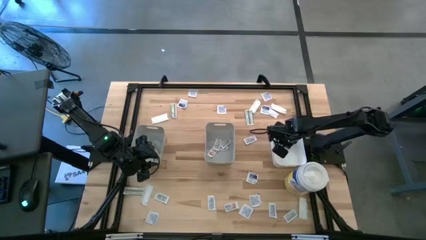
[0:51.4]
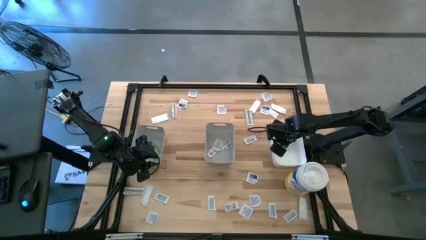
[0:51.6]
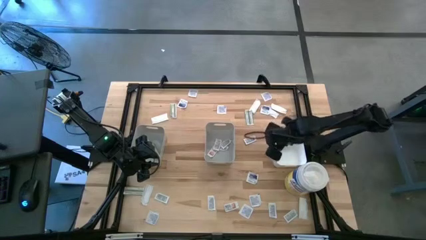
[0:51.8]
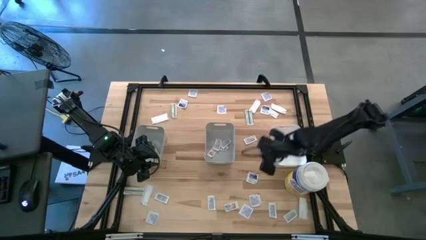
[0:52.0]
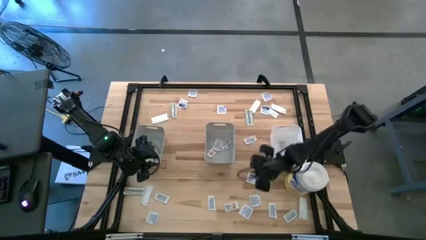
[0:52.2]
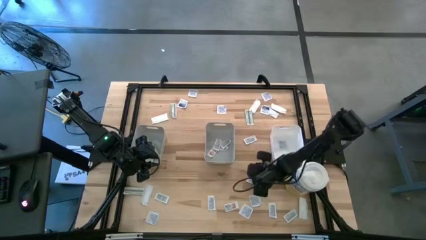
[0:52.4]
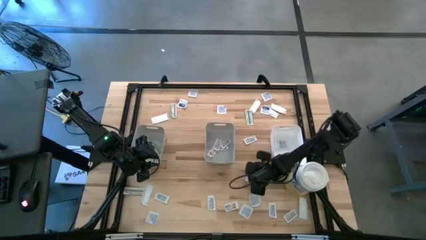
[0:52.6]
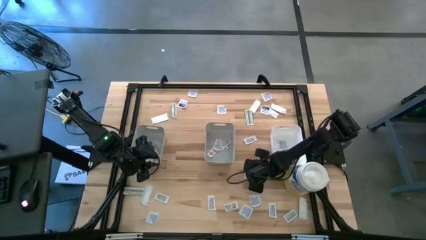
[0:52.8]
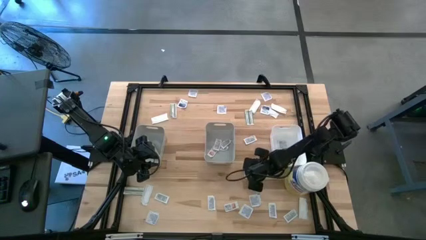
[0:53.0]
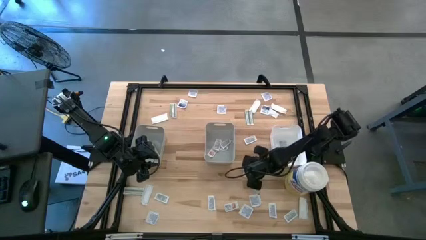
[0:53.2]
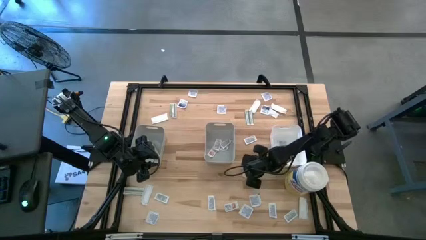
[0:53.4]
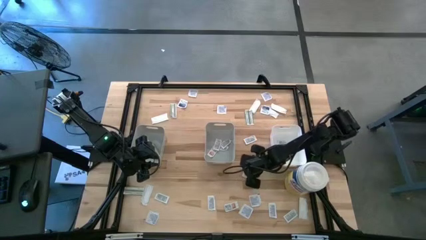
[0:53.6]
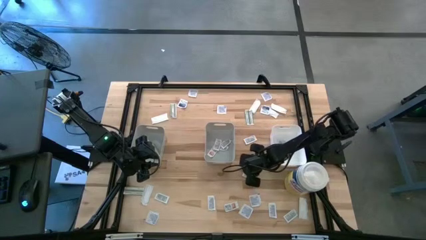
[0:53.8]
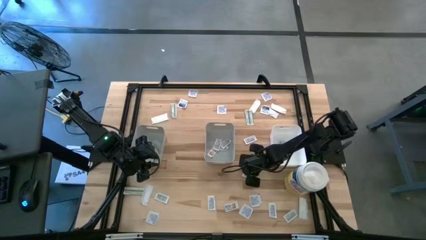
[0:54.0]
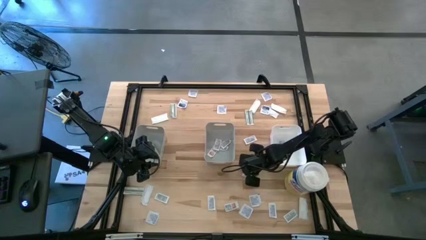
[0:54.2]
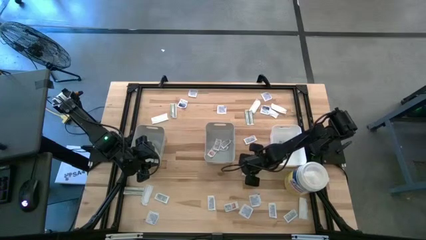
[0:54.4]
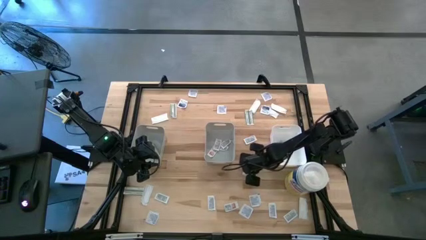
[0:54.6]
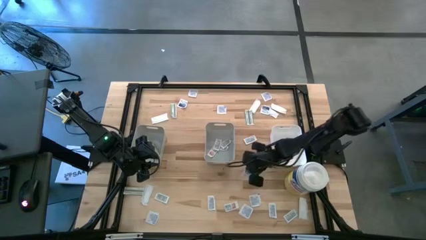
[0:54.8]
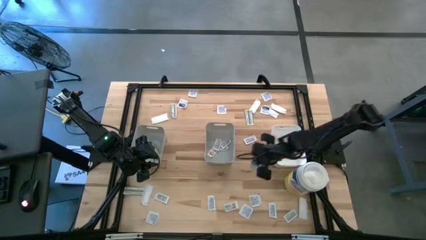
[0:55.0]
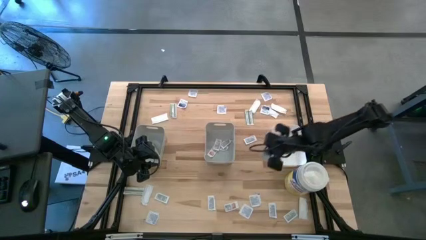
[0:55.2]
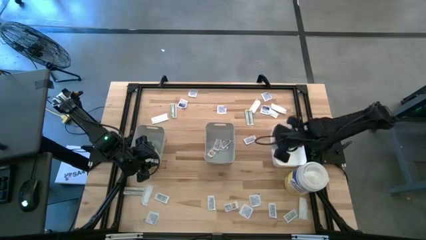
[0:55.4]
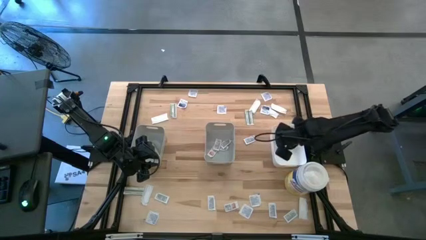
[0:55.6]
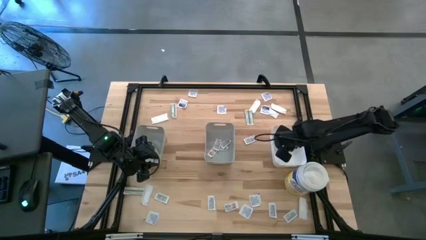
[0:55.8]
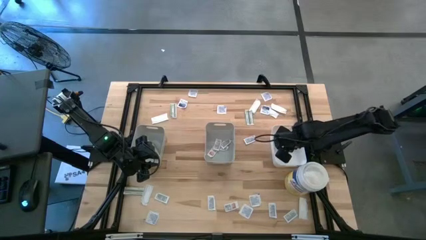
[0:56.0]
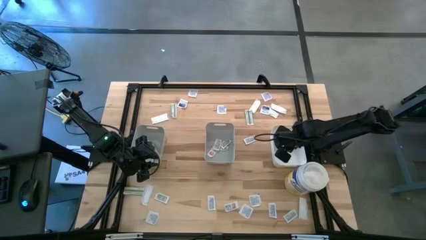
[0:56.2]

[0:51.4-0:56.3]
Task: Pick & Place First Aid Supplies
Put the alcohol pad into the white bin

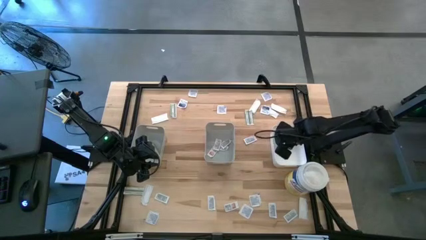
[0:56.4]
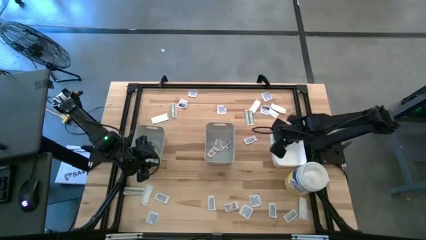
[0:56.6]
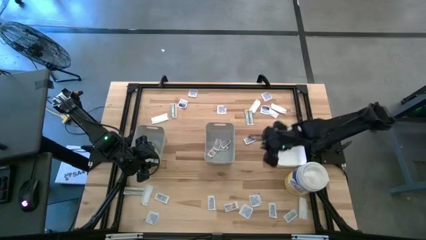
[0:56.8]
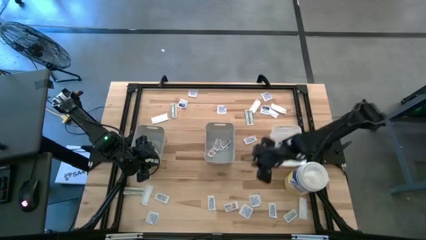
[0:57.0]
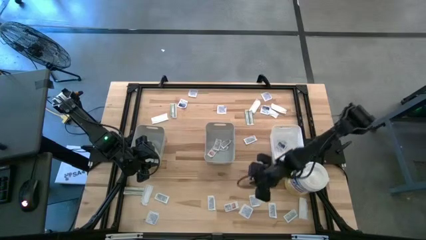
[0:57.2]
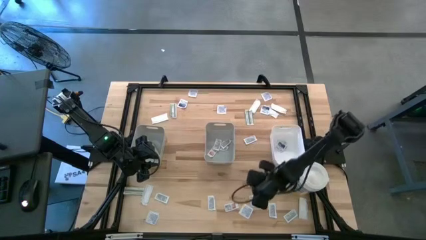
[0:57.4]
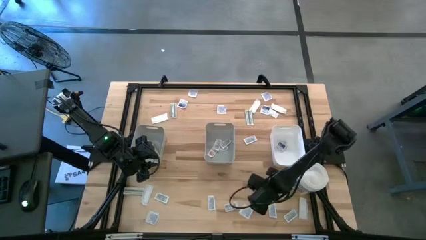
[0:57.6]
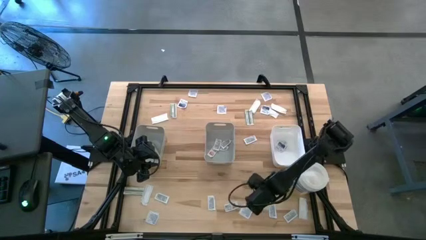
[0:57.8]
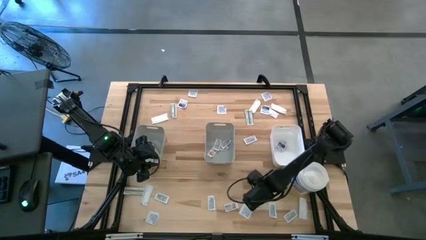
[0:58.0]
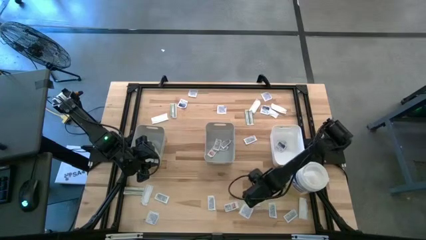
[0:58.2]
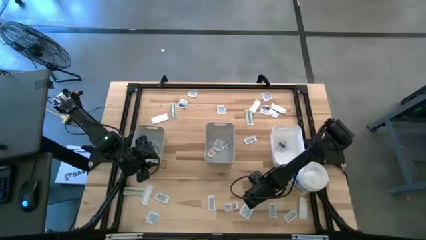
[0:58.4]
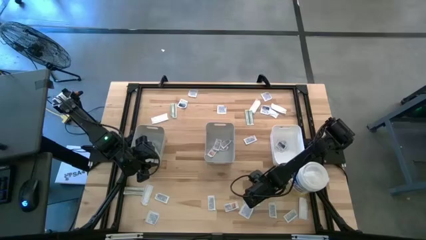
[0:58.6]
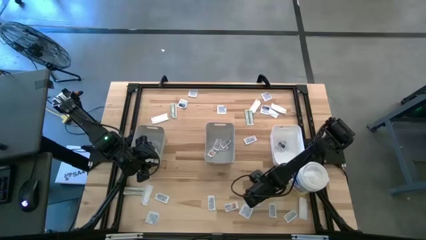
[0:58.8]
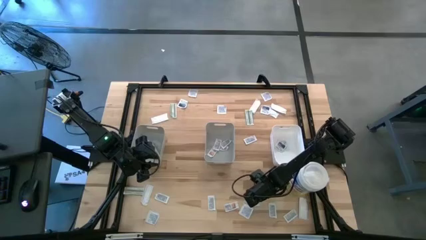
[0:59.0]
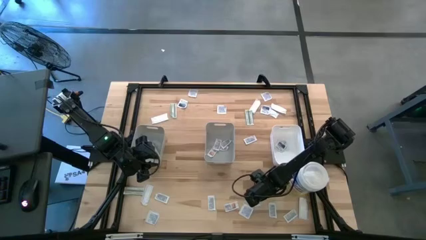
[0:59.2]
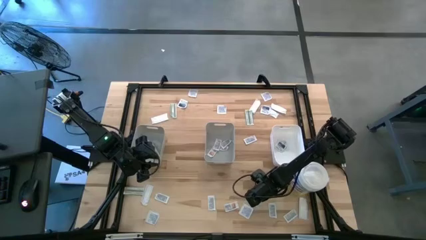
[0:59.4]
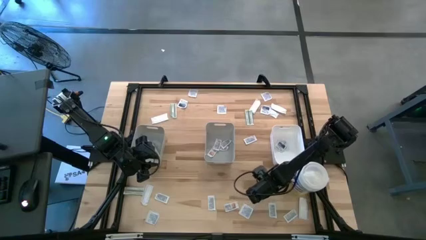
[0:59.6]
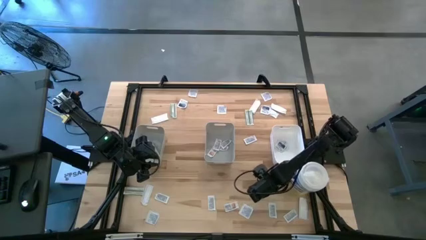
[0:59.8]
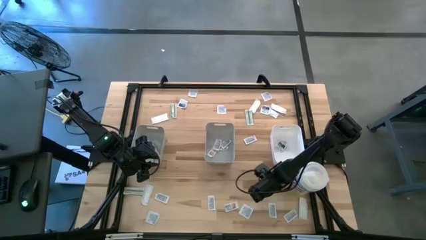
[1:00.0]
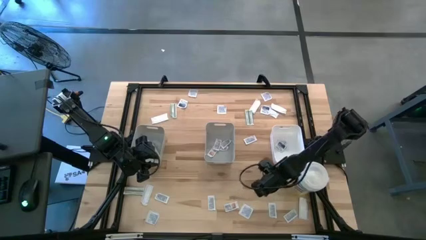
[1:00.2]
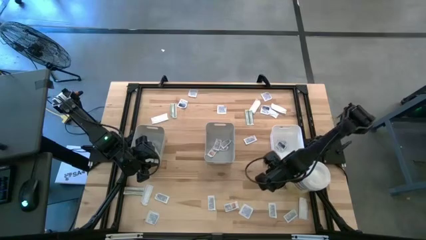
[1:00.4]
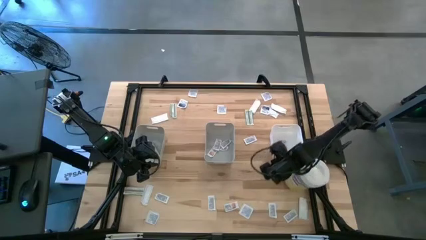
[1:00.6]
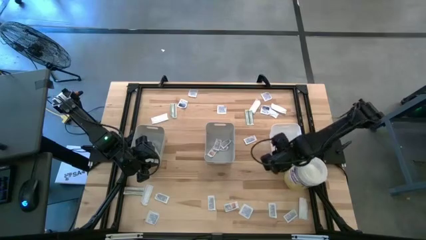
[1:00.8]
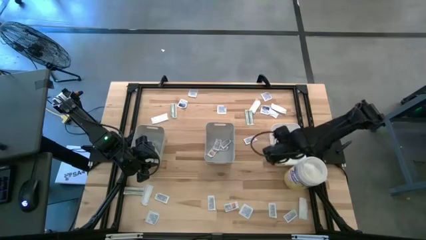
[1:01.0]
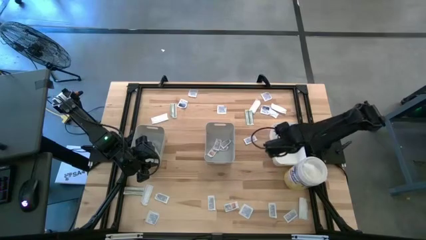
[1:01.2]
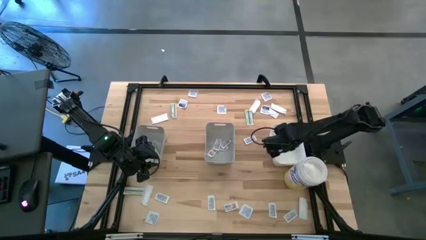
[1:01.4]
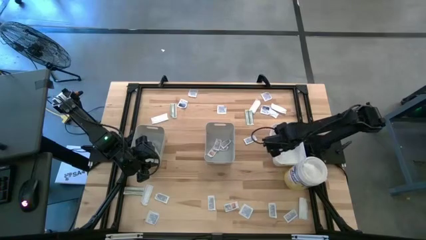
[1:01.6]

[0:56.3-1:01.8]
Put the alcohol pad into the white bin

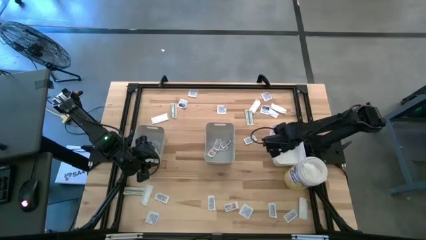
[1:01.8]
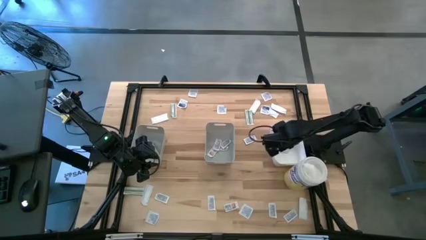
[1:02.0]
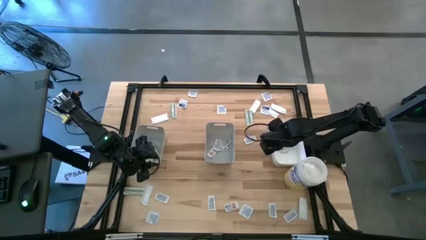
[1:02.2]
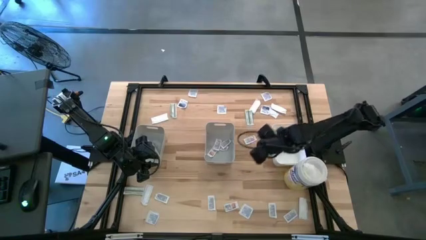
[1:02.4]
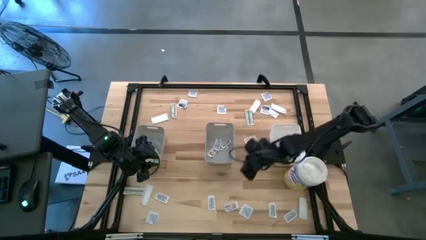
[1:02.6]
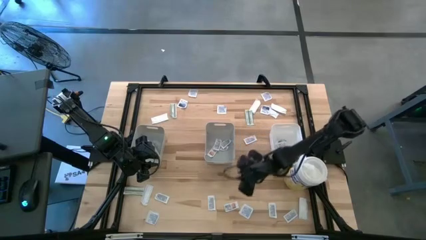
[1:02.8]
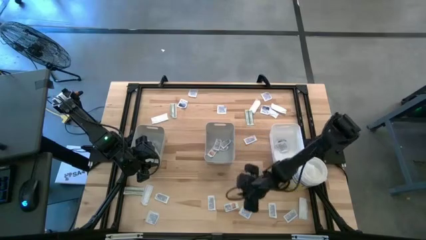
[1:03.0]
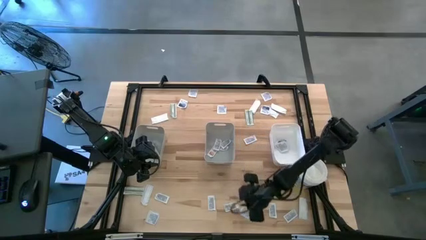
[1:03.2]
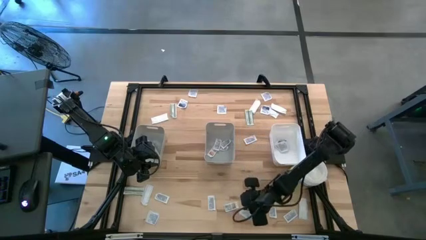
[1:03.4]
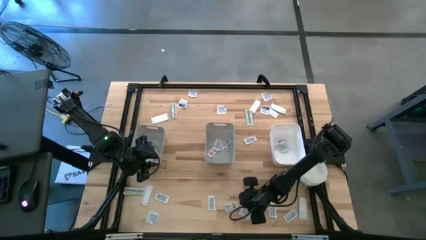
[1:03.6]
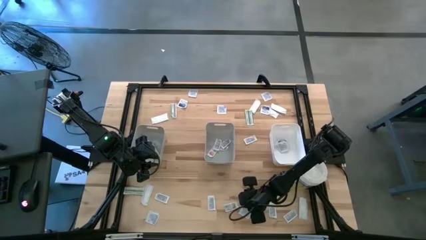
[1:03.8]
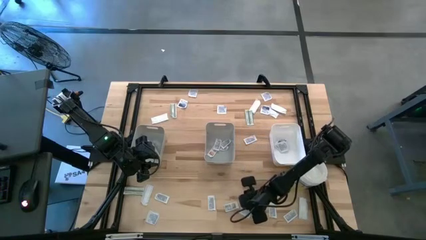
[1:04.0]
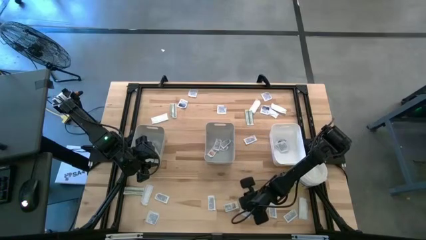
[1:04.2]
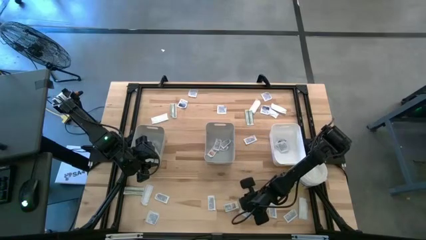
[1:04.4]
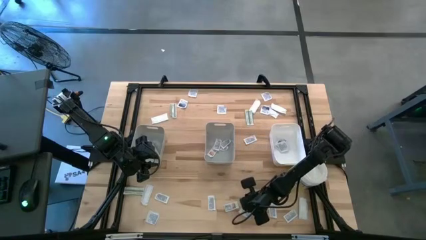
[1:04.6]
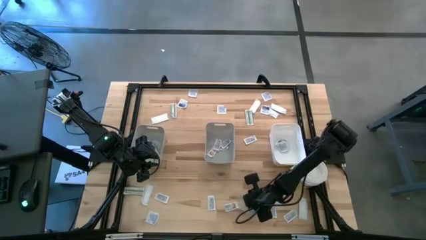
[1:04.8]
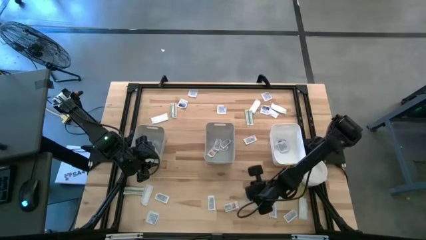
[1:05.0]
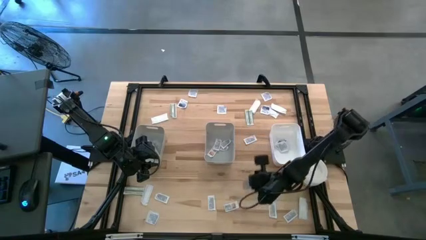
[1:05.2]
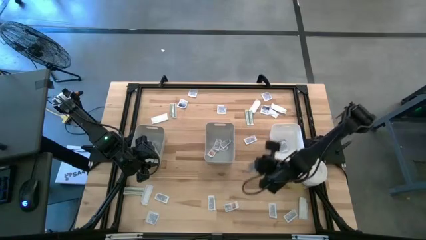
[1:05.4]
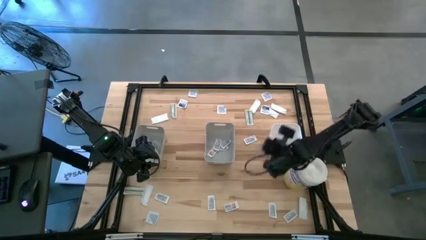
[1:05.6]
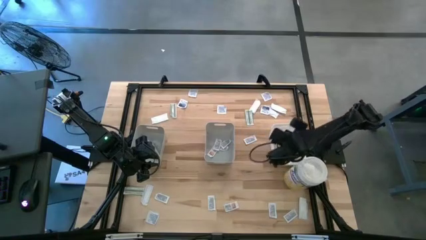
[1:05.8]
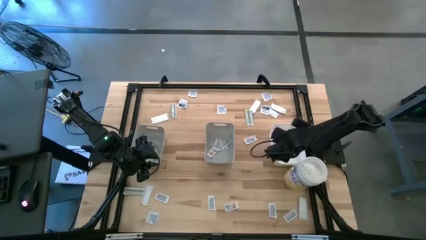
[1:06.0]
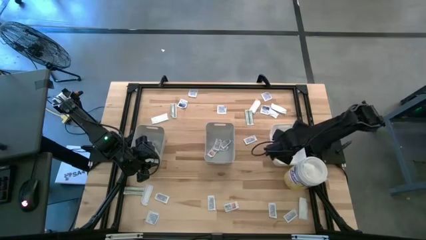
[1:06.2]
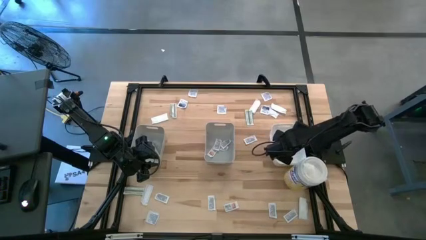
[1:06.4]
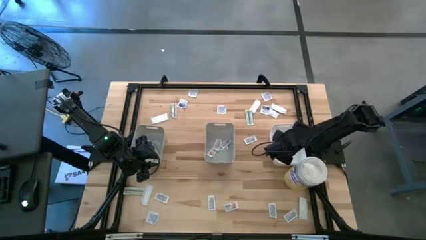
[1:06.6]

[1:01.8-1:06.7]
Put the alcohol pad into the white bin

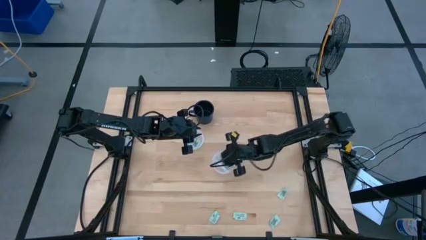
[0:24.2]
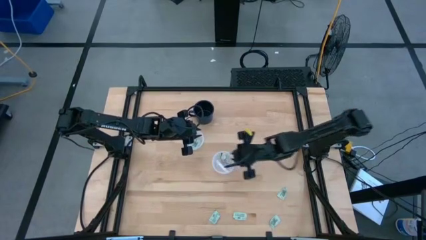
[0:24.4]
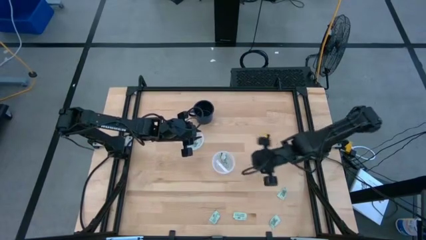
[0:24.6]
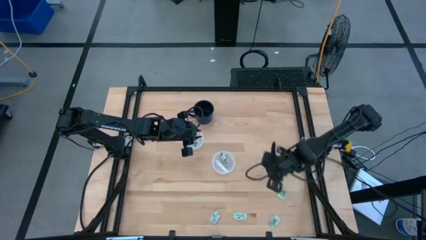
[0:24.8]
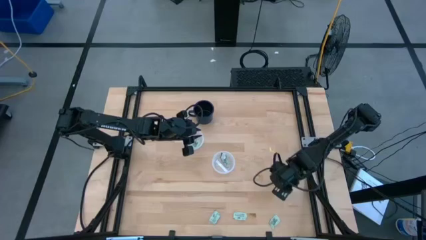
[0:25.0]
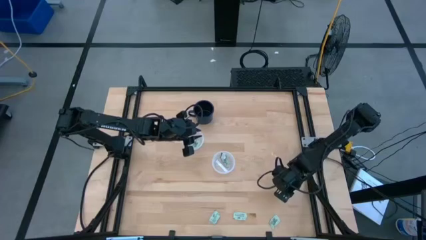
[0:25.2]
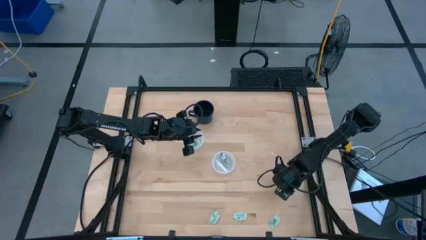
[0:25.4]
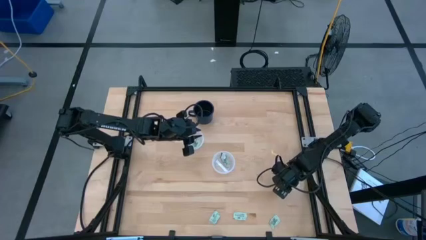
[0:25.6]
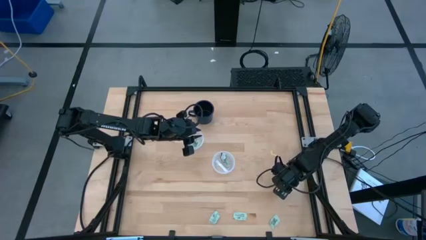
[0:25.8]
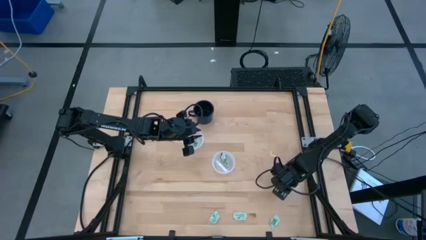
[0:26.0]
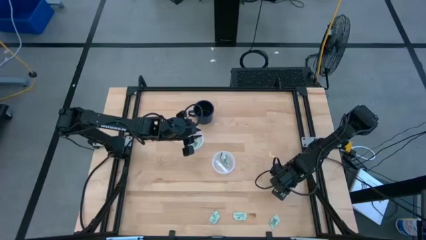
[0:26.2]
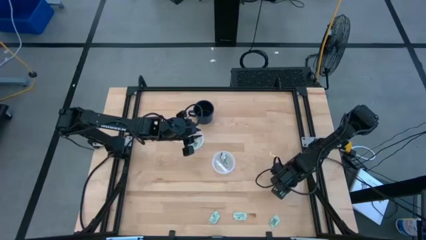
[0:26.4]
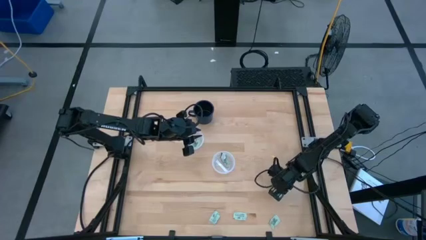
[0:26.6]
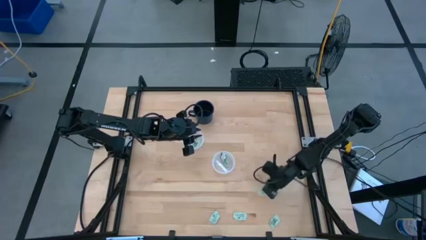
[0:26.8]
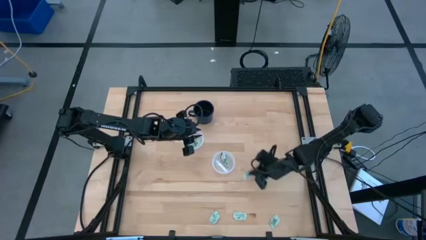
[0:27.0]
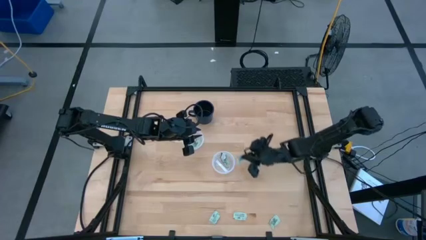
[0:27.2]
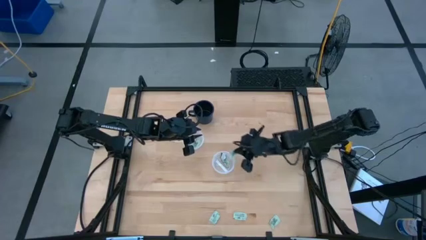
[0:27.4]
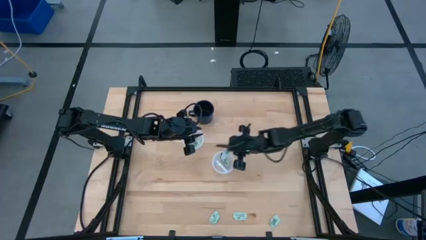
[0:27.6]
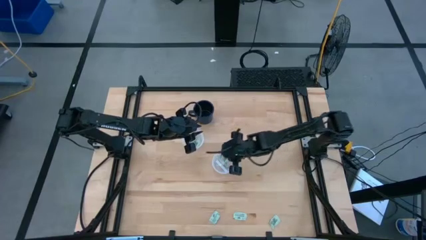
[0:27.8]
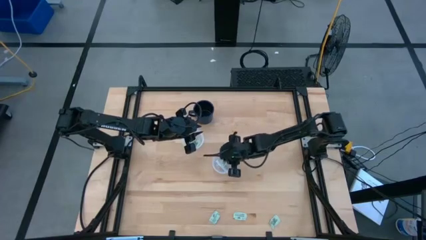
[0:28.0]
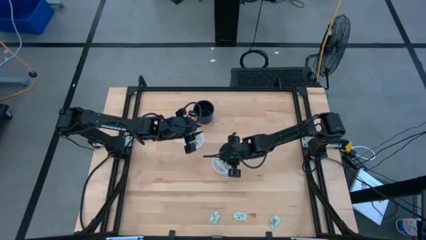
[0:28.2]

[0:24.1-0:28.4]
Task: Pick and place Stevia / Truvia into bins
Put the stevia packet into the bottom round transparent container
